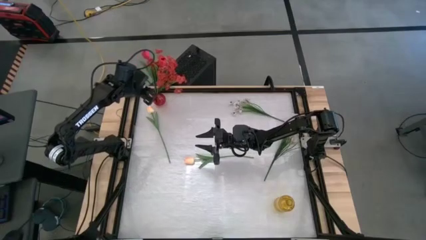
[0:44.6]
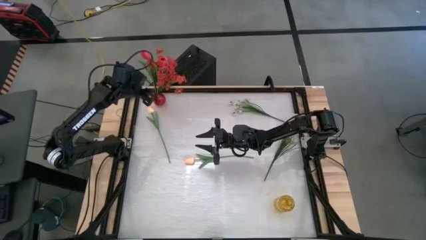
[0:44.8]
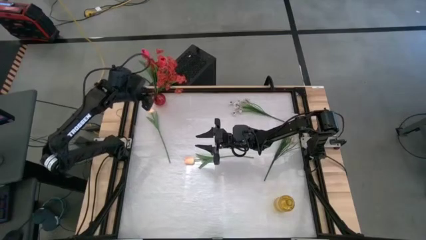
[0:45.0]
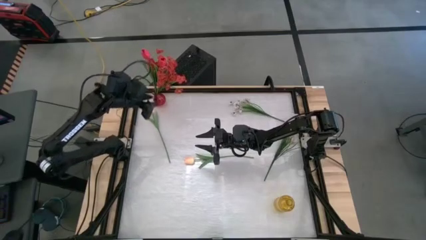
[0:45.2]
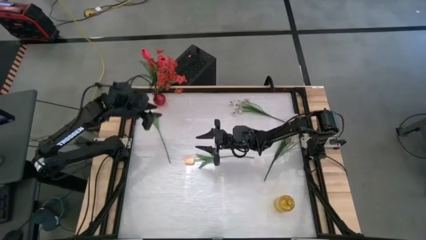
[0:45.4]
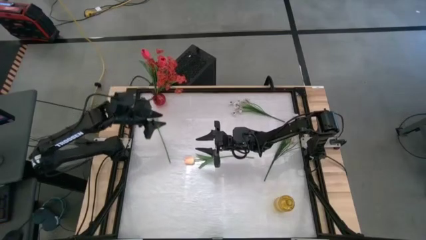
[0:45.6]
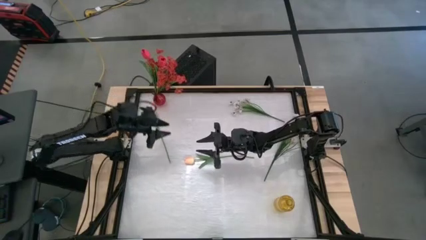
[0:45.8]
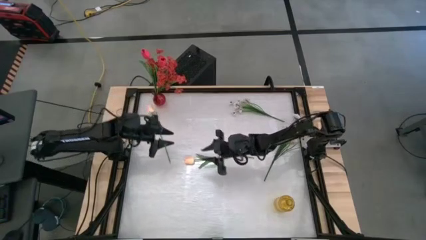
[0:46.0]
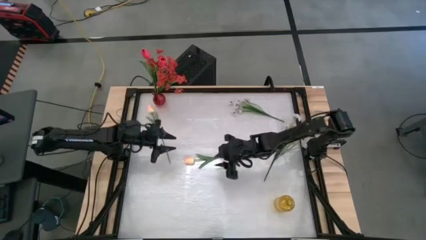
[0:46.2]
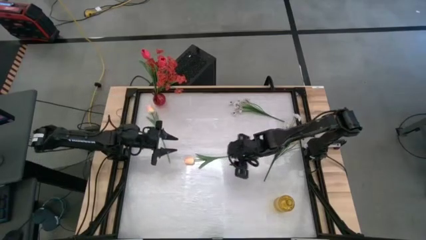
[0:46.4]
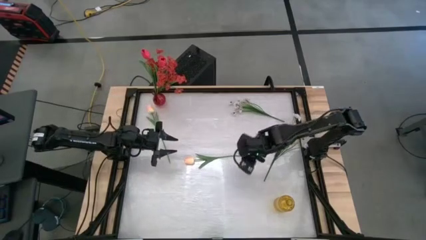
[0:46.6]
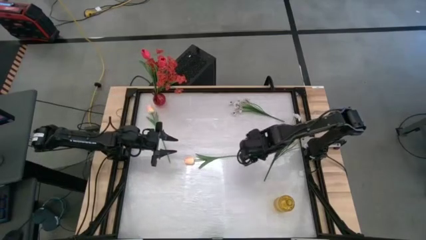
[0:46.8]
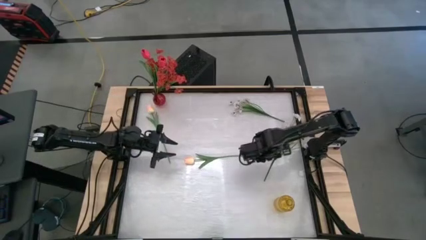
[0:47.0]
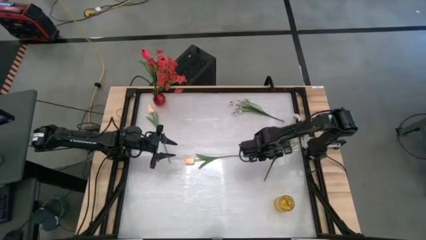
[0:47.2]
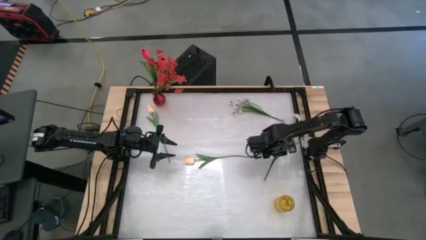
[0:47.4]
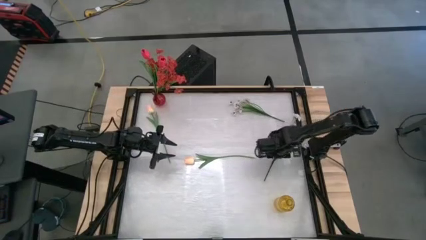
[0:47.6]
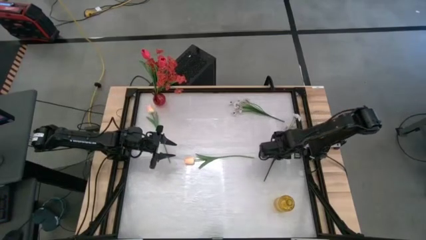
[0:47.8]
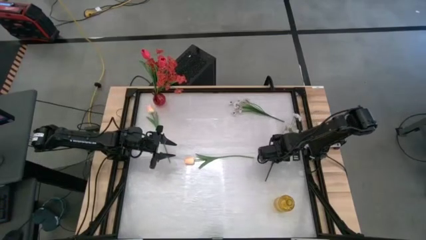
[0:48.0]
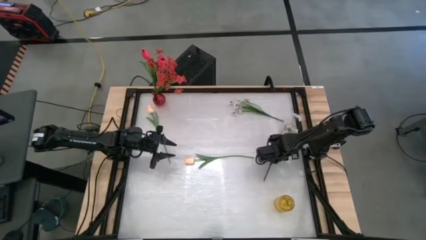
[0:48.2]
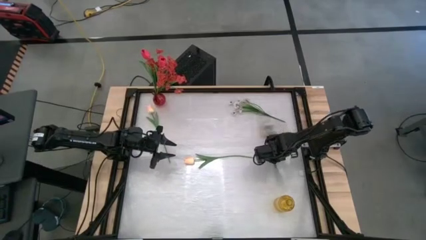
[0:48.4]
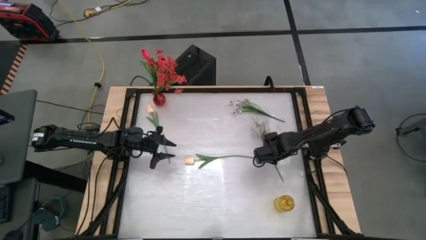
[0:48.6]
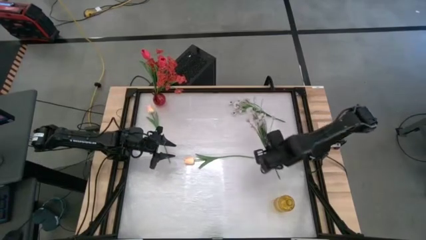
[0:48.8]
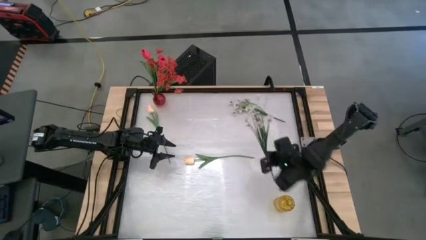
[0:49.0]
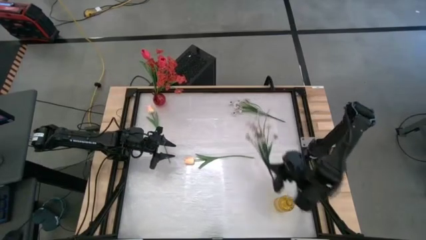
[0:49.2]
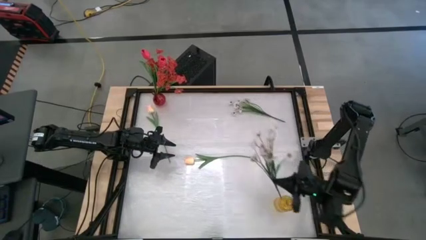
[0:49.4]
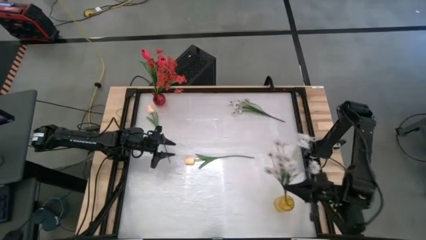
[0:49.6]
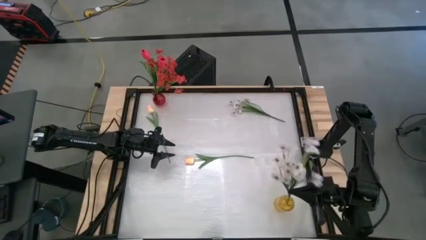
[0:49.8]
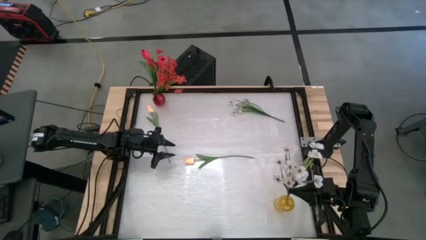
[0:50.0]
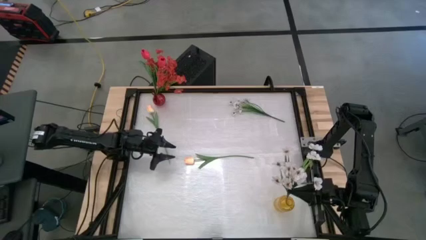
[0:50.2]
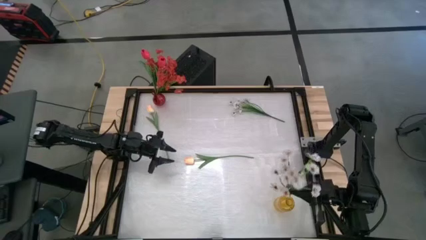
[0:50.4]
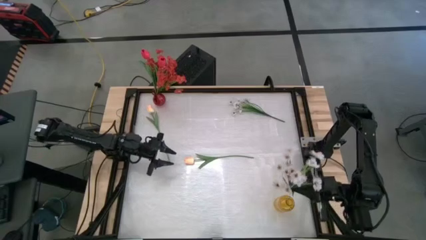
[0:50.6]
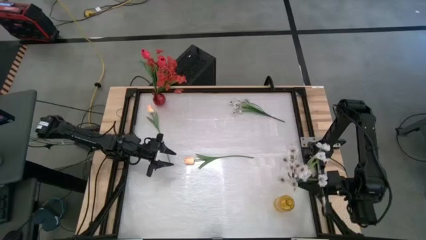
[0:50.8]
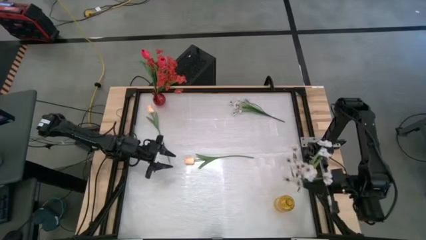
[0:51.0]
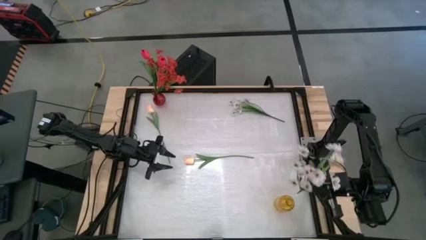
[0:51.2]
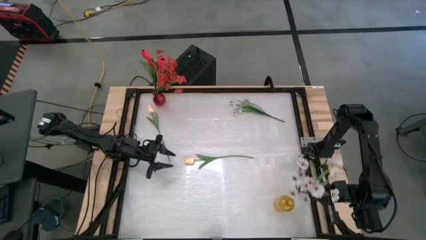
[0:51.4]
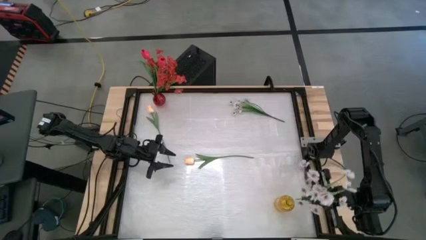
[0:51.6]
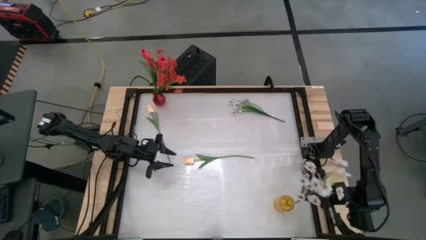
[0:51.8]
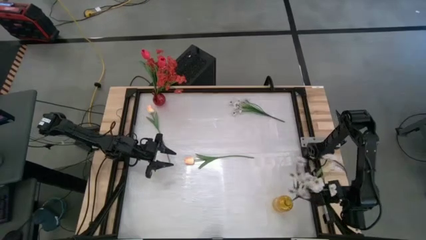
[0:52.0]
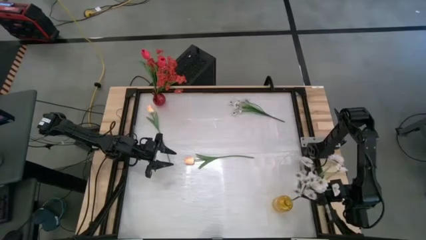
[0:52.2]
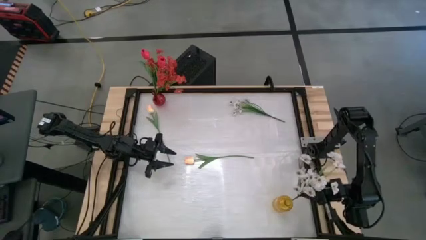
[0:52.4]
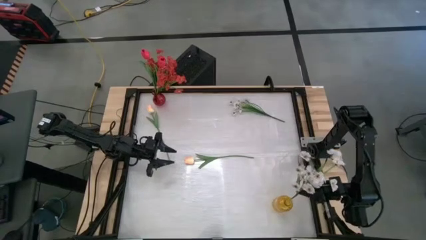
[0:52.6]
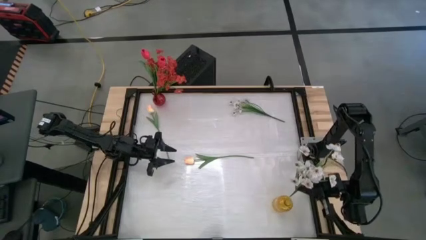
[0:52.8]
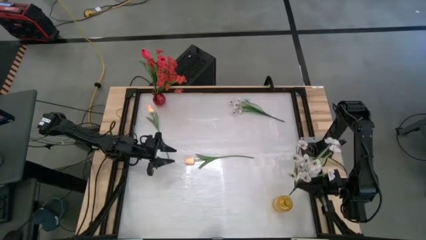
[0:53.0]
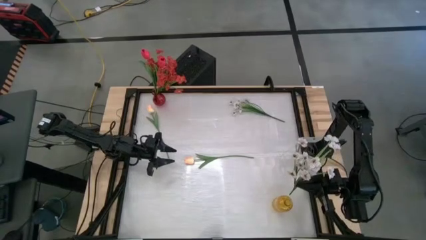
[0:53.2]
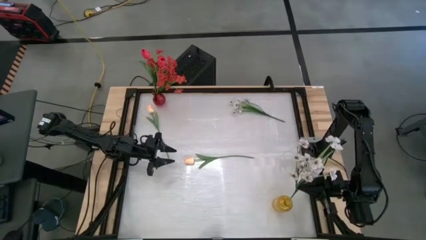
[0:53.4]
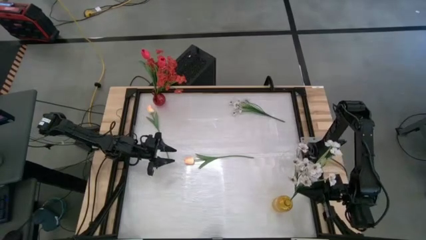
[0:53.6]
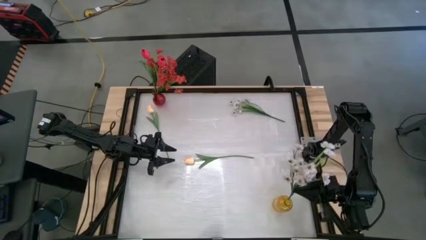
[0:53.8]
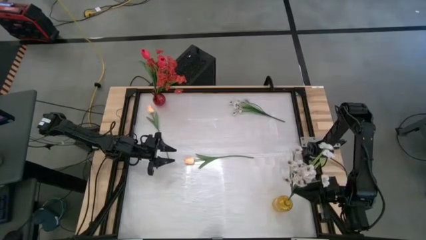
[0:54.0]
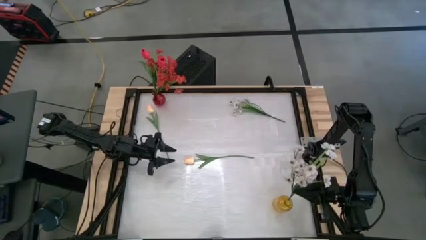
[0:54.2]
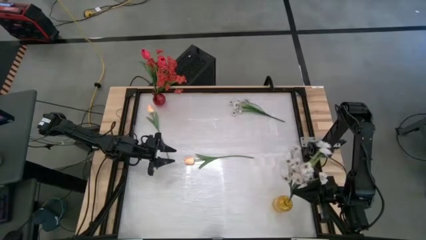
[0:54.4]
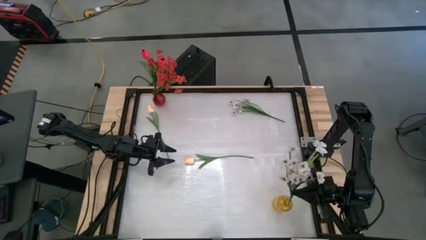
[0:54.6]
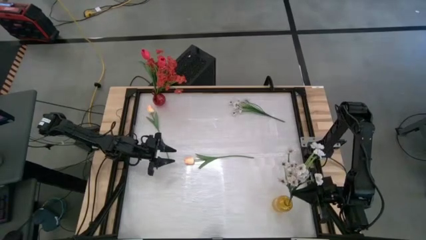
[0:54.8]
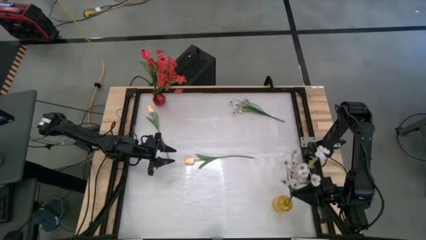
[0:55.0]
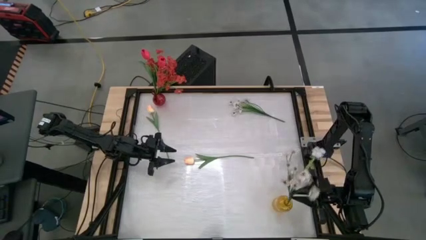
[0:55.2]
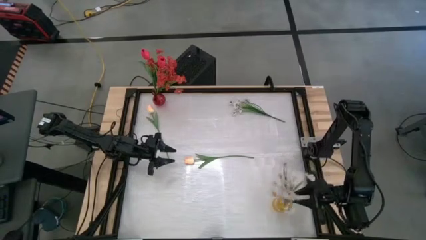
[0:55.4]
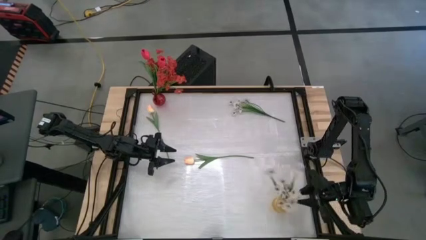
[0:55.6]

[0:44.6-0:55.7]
Task: Sort flowers into vase by color
Put the bottom white flower into the transparent yellow vase

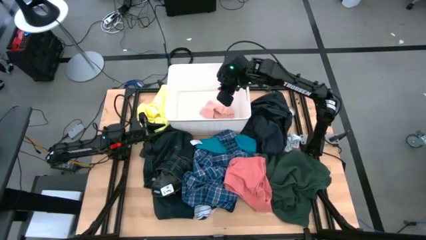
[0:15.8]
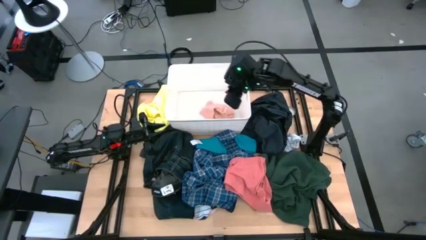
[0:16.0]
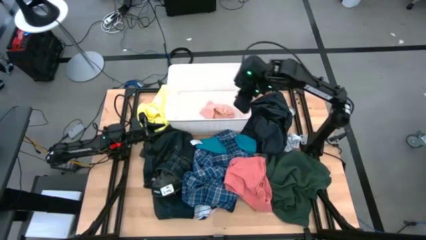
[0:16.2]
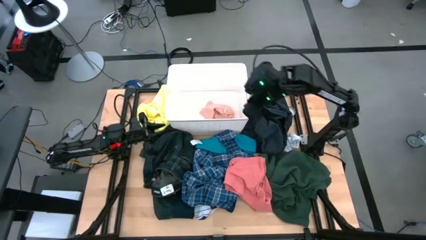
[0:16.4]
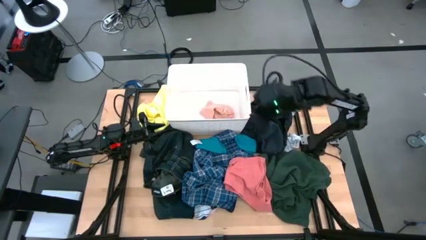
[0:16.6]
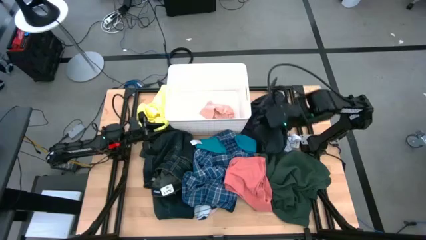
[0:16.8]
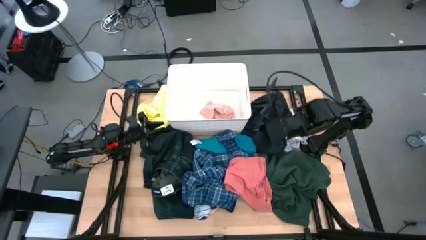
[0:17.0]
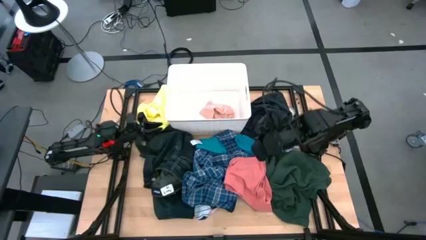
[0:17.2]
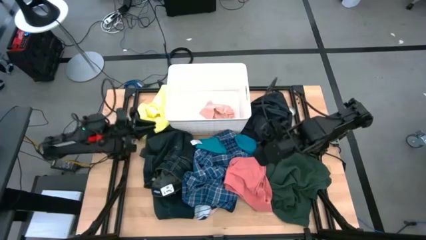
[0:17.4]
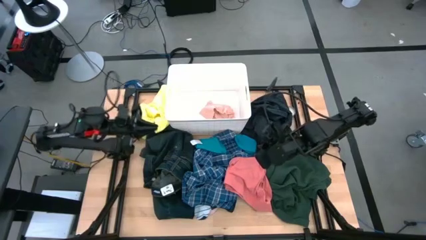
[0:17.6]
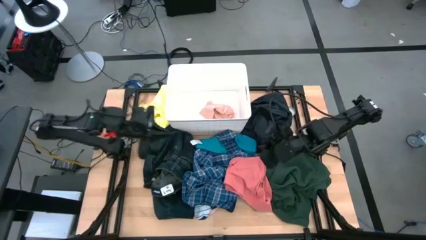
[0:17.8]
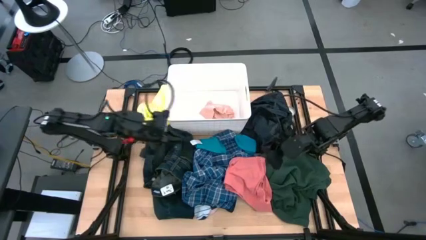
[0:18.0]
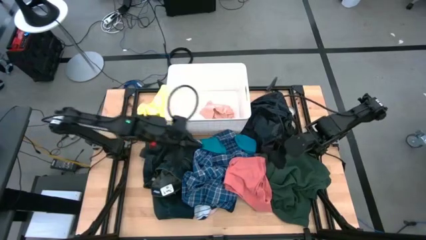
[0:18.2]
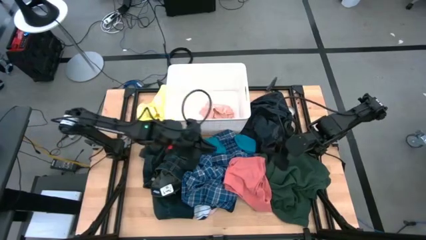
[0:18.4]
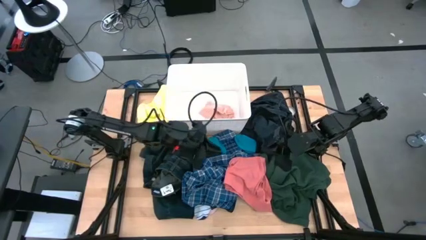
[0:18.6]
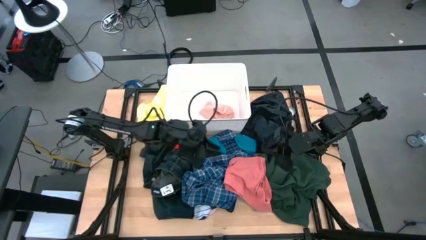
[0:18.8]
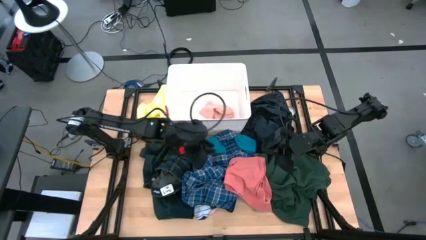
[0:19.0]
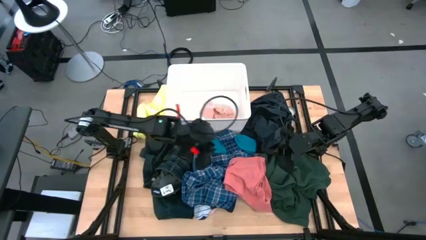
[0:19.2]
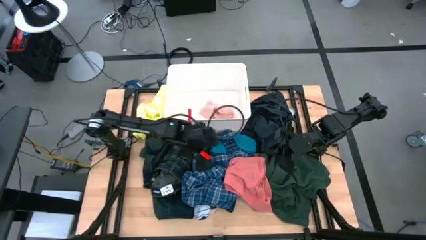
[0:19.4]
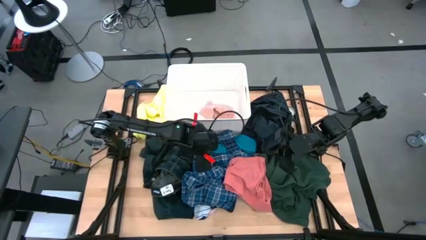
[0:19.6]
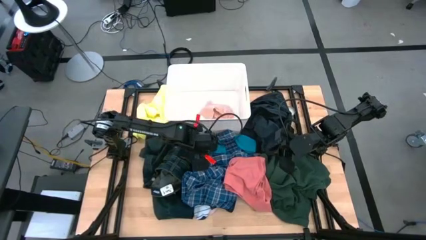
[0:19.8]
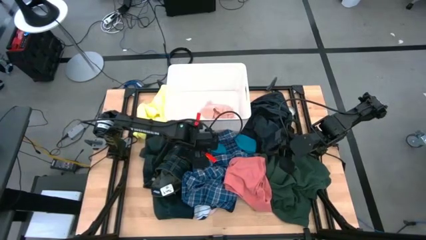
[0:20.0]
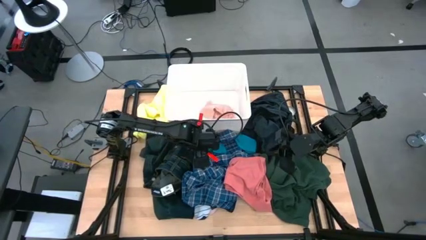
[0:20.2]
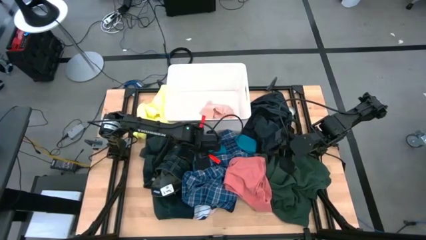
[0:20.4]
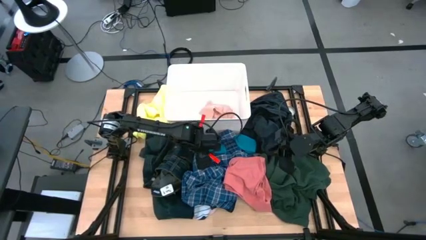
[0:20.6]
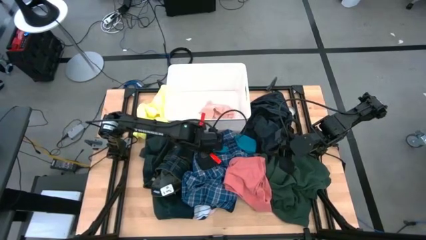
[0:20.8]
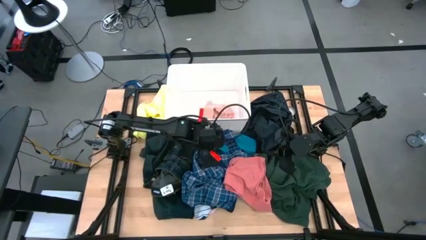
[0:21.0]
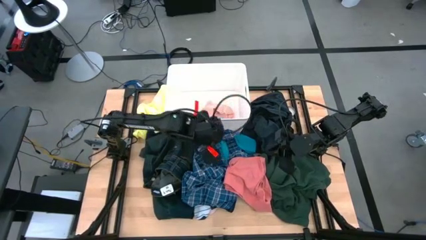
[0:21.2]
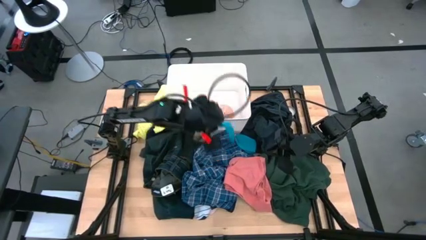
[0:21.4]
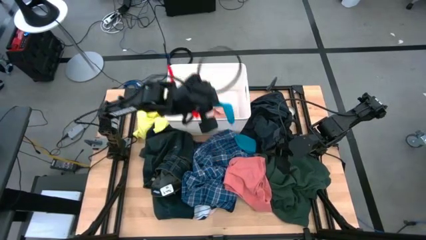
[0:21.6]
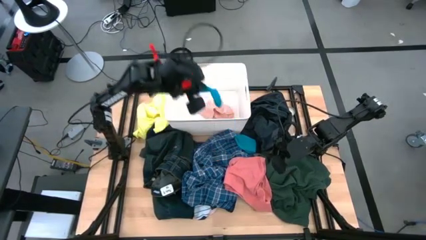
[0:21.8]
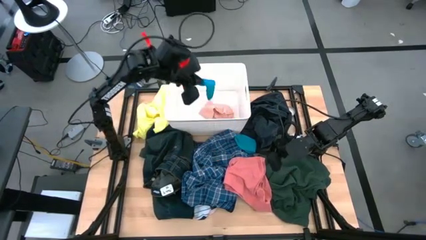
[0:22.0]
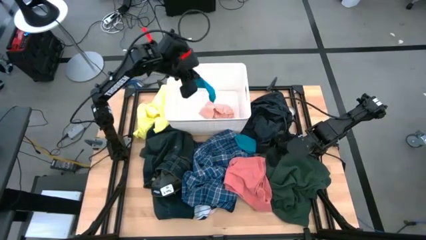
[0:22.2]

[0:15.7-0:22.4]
Task: Sort clothes
Put the left blue sock into the laundry organizer
